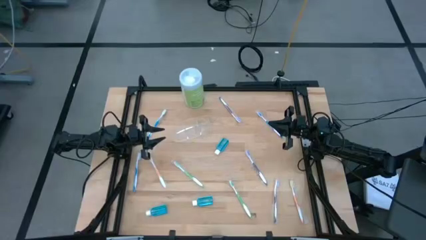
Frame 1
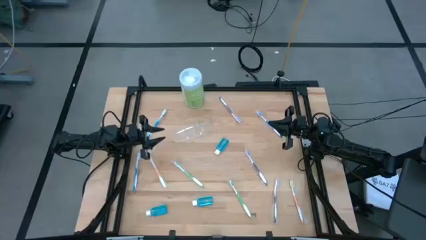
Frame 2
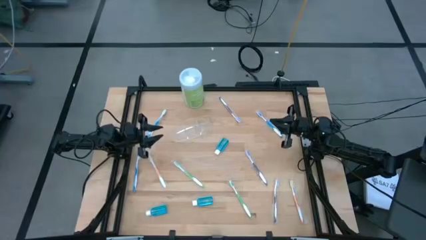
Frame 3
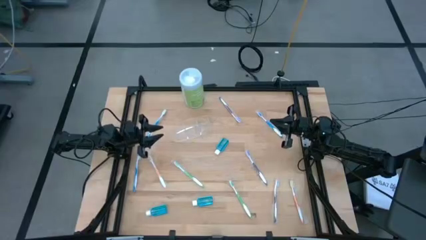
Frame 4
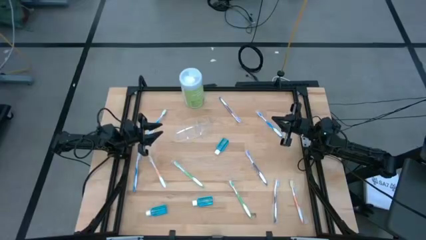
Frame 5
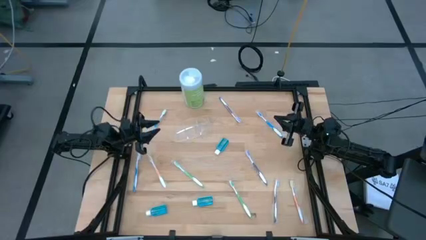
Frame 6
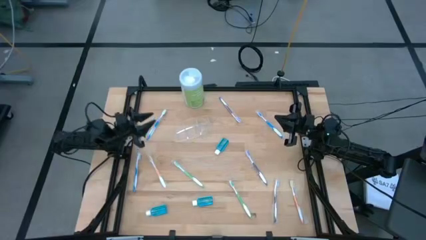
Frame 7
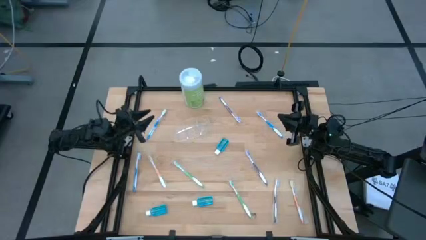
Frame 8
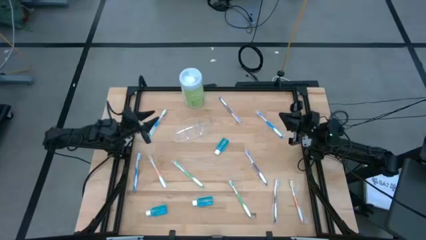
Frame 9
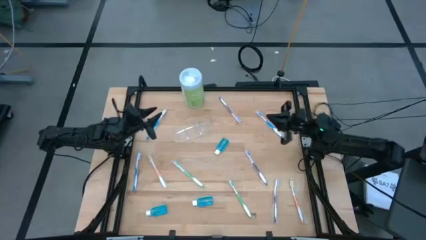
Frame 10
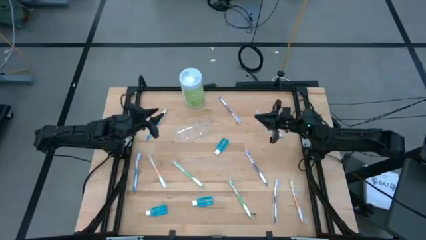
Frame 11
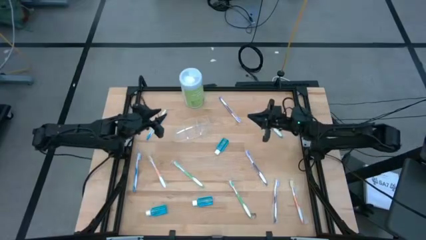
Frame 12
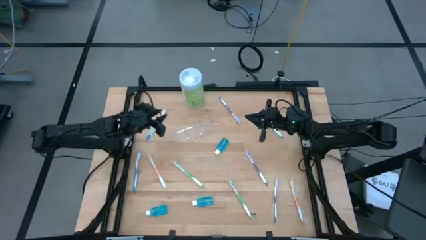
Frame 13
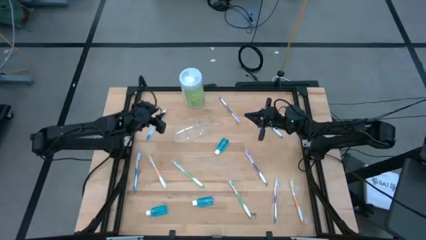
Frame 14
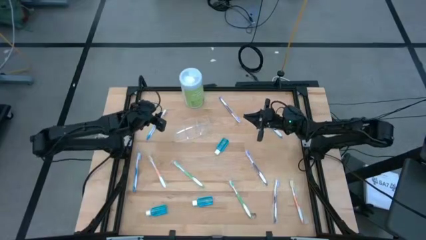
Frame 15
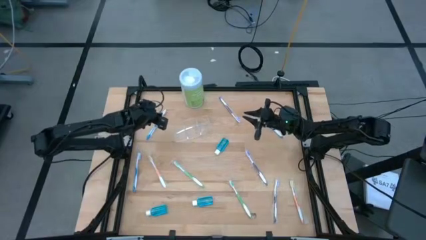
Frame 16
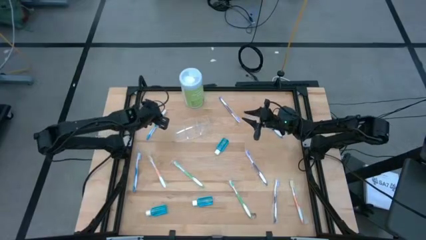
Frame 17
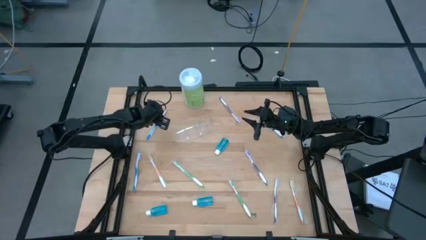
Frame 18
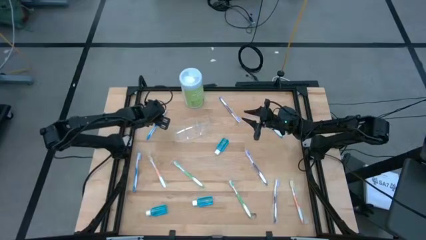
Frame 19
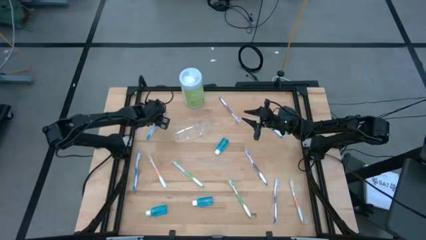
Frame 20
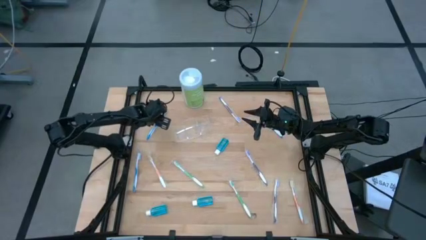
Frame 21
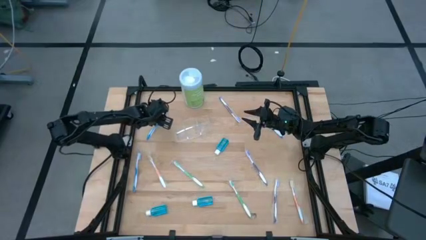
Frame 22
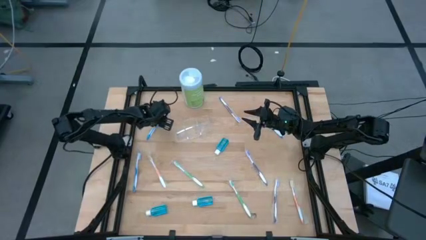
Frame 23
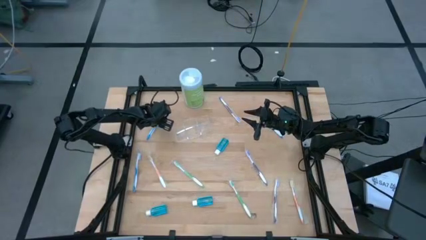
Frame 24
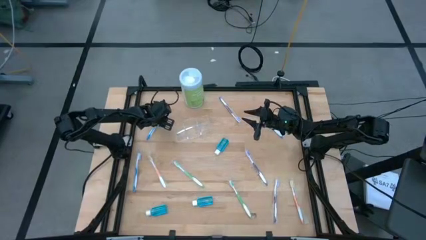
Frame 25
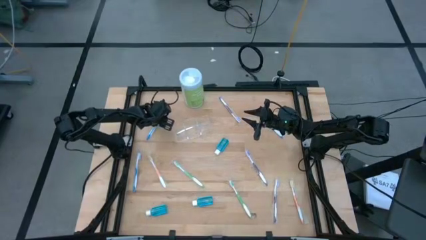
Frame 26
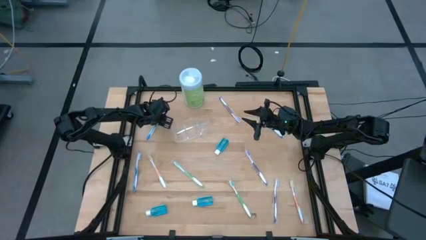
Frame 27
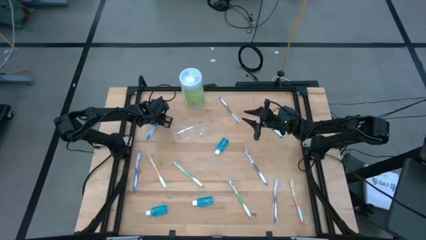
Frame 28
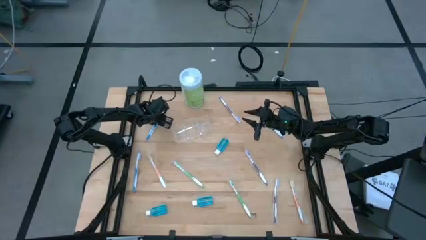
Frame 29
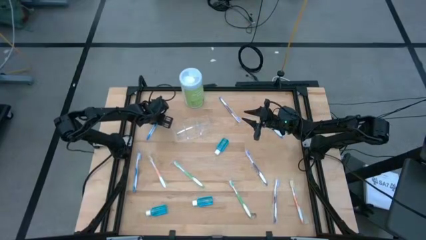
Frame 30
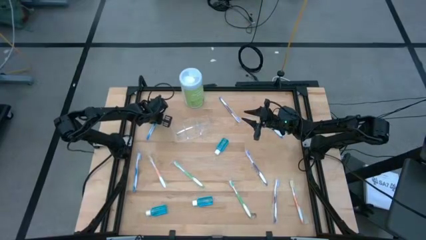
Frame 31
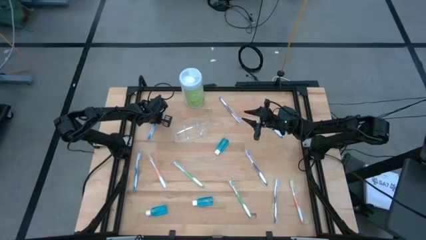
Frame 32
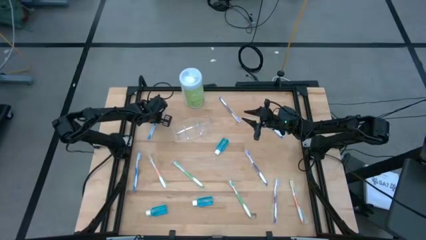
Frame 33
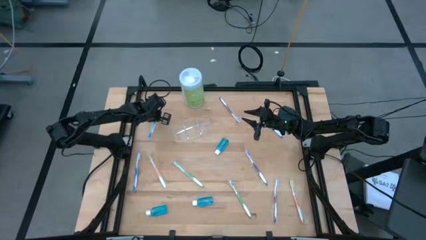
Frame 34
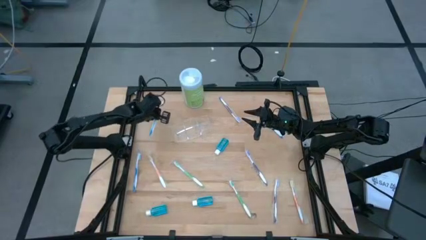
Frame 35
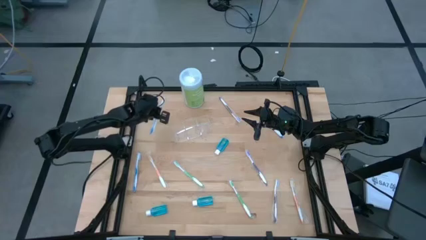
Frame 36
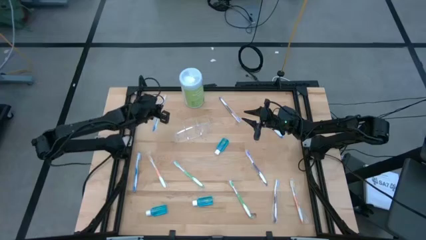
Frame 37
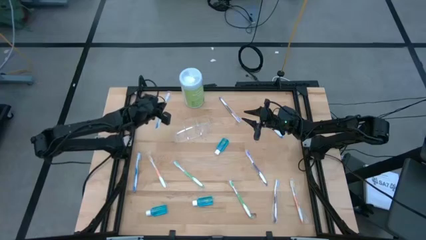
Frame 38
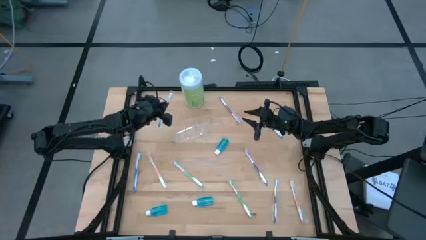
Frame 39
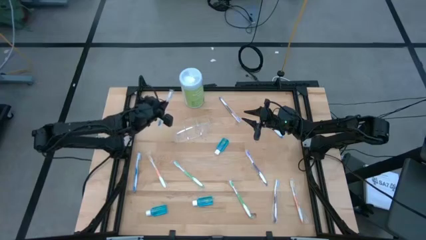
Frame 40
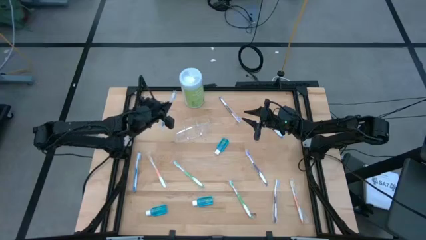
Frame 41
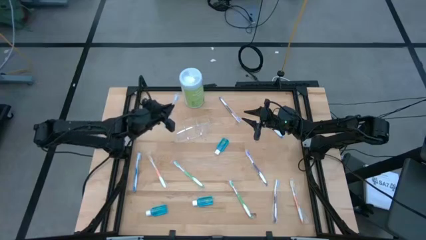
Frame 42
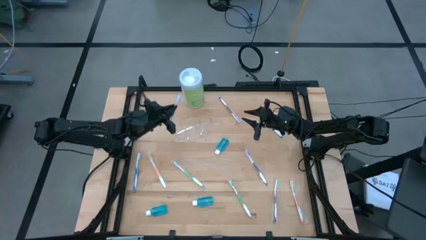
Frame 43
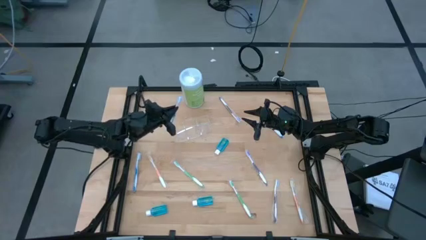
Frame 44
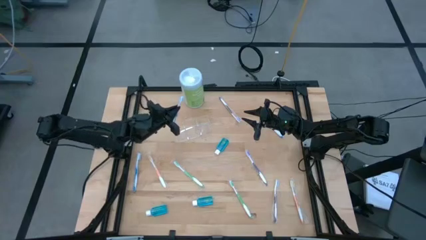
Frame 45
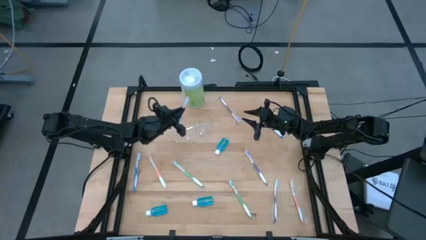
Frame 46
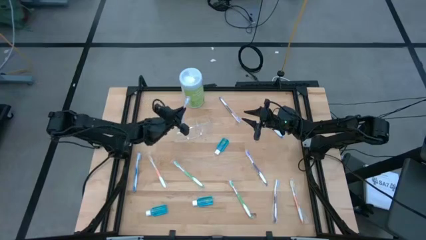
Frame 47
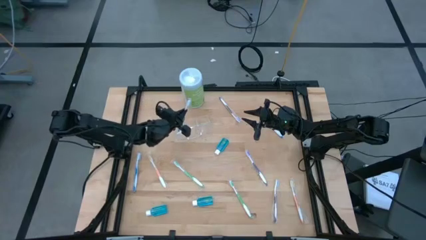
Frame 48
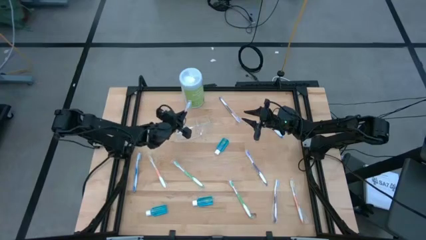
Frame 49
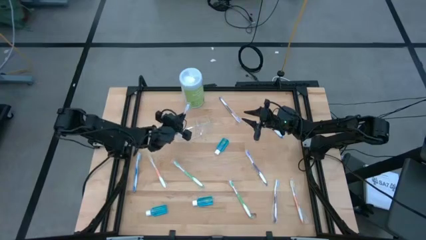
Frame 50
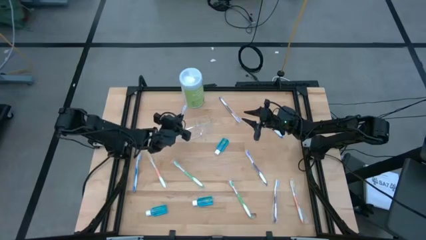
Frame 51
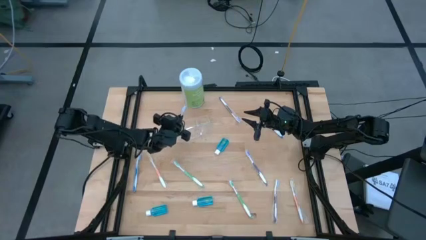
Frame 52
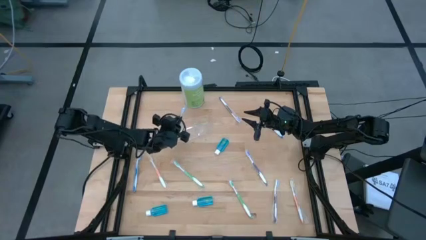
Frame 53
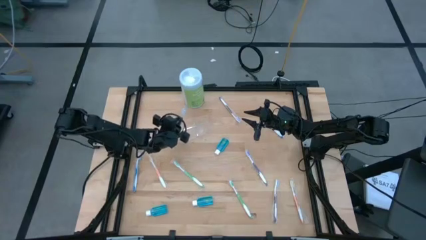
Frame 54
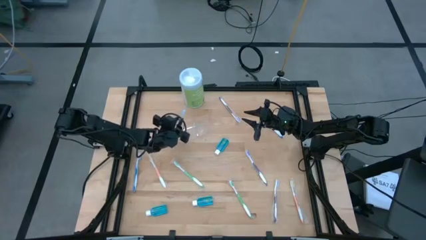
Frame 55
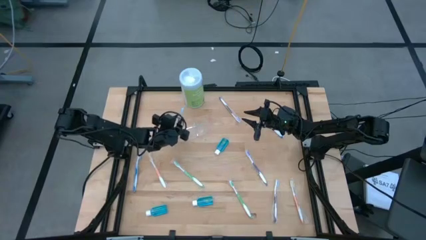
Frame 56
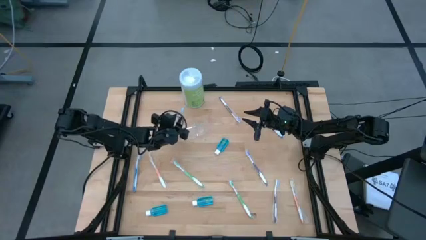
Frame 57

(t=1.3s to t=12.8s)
Task: Pick & Place toothbrushing station
Put the top left blue toothbrush into the transparent organizer

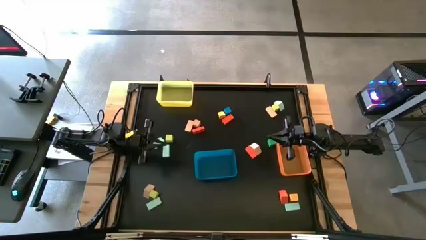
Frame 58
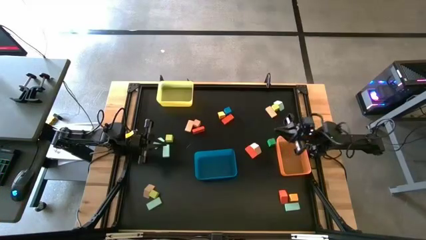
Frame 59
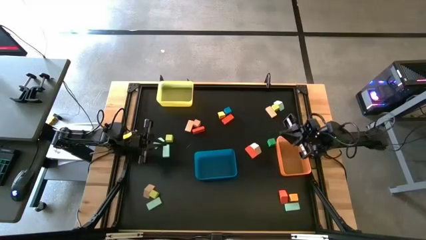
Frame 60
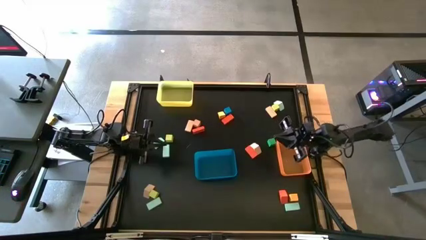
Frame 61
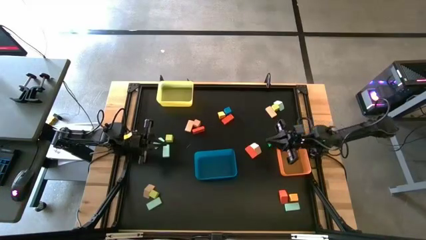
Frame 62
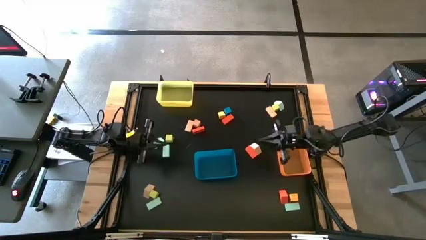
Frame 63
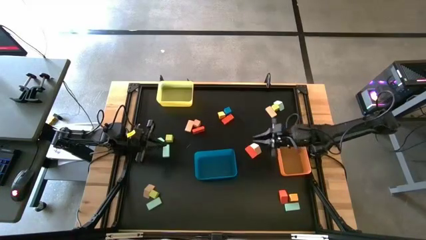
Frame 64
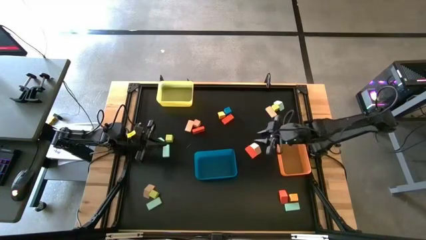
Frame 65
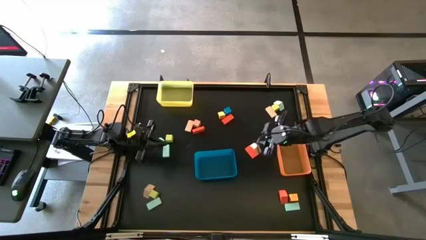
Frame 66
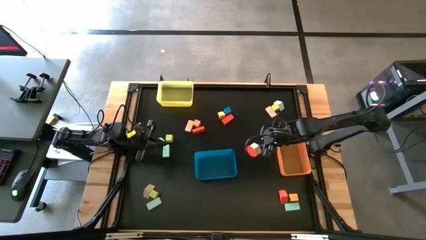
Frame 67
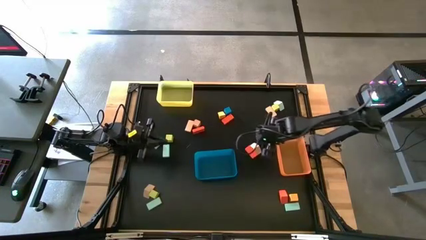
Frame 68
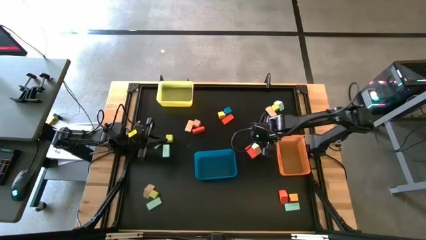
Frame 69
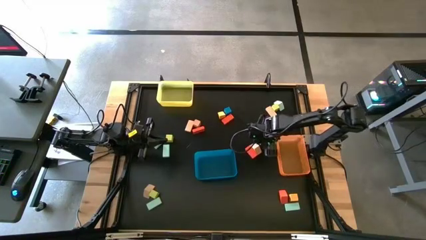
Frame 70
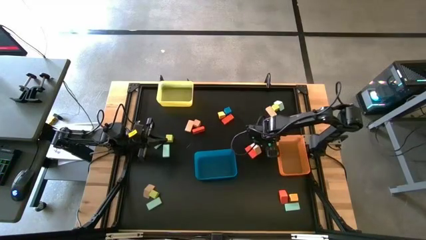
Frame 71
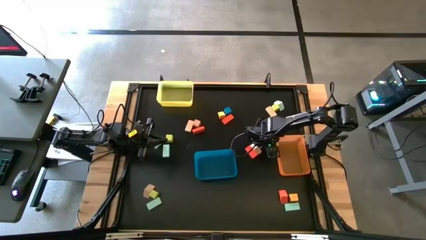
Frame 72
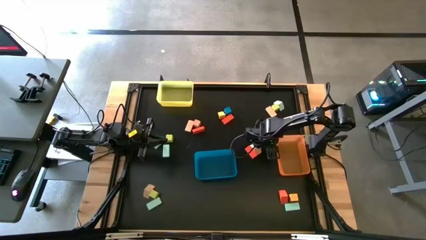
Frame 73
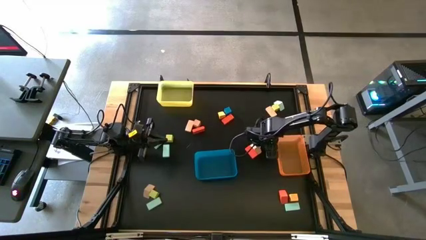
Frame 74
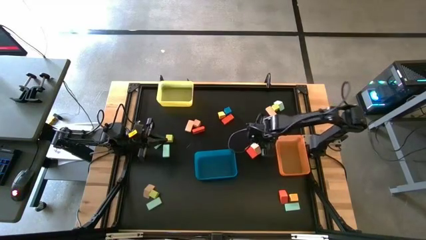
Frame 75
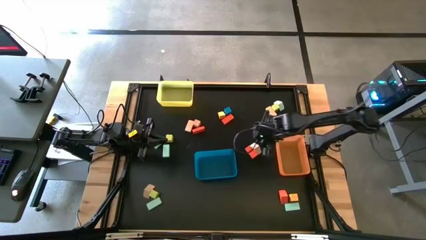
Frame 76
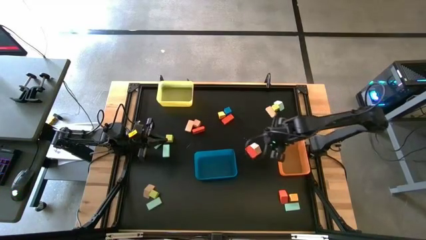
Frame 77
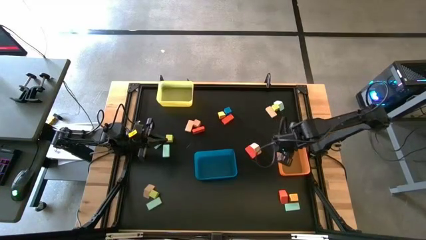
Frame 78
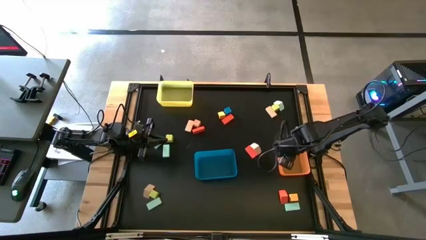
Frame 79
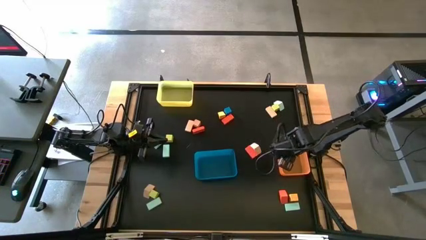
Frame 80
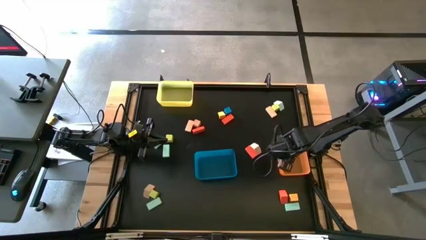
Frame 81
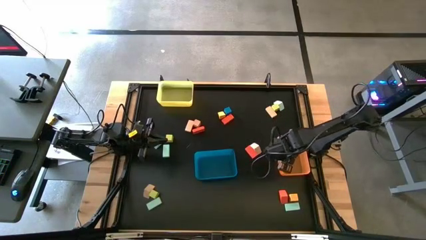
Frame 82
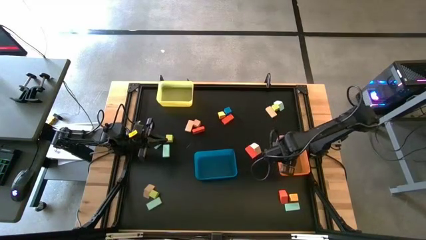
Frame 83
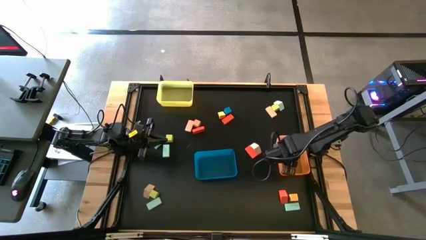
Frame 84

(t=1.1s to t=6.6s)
Task: Sort blocks by size
Put the green square block into the orange bin
